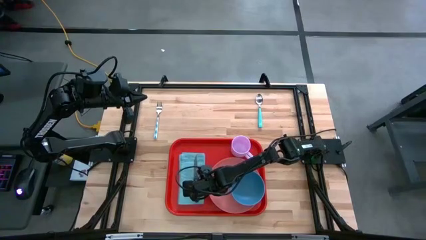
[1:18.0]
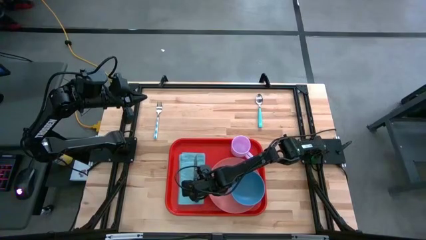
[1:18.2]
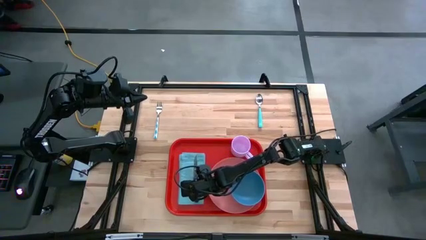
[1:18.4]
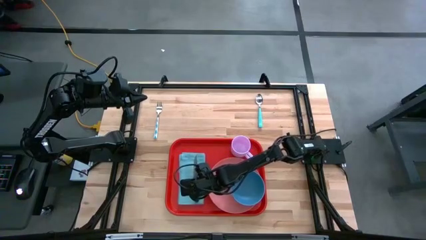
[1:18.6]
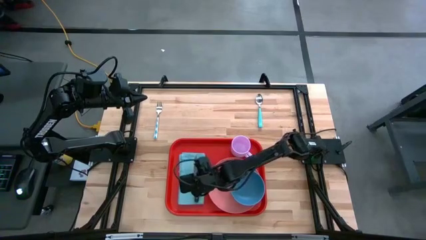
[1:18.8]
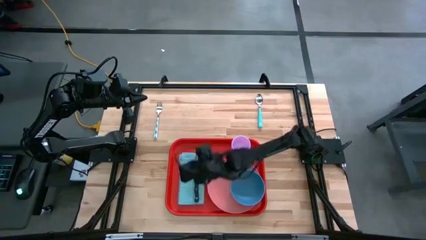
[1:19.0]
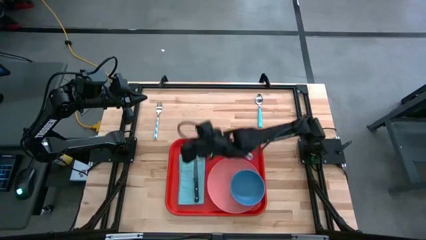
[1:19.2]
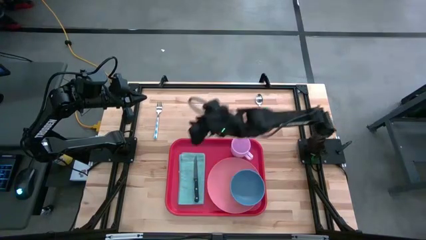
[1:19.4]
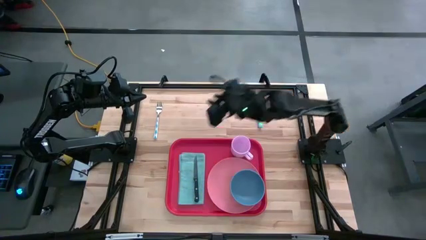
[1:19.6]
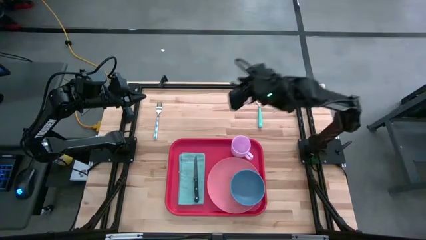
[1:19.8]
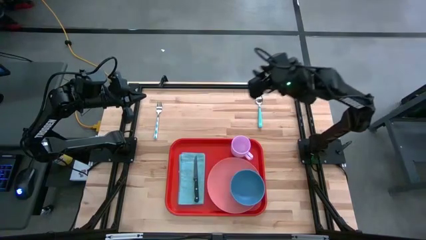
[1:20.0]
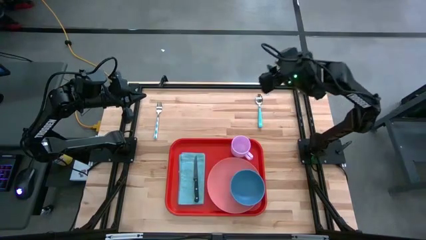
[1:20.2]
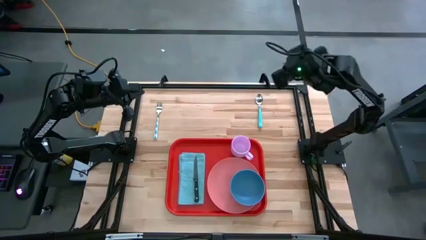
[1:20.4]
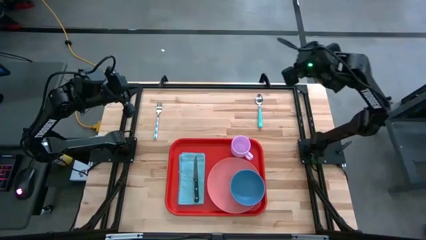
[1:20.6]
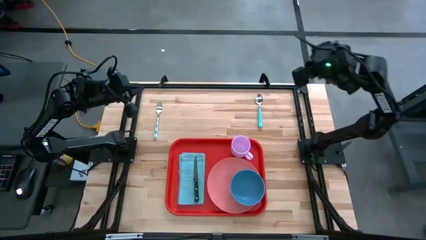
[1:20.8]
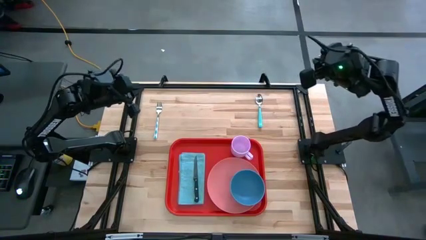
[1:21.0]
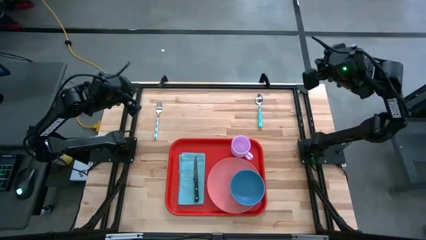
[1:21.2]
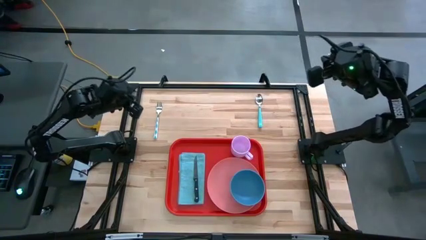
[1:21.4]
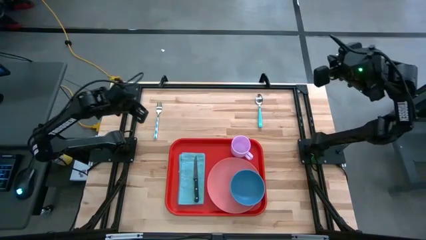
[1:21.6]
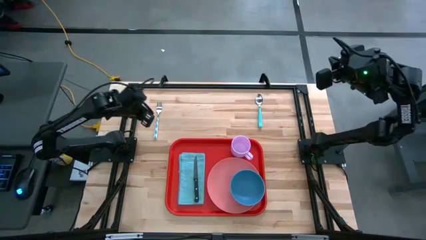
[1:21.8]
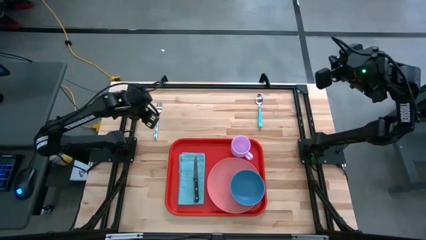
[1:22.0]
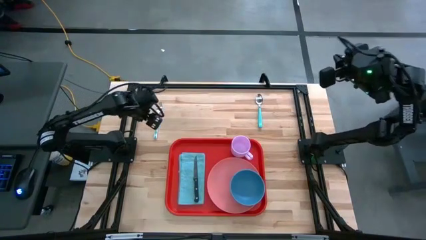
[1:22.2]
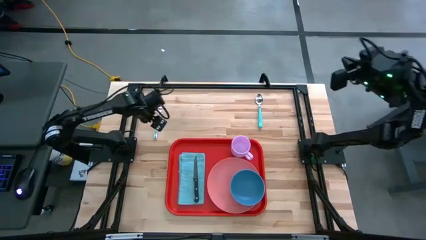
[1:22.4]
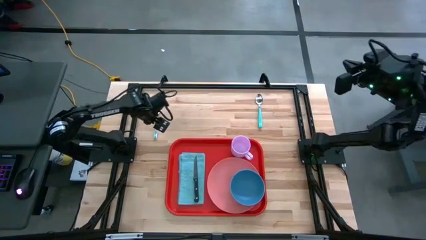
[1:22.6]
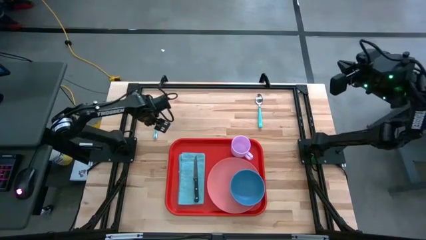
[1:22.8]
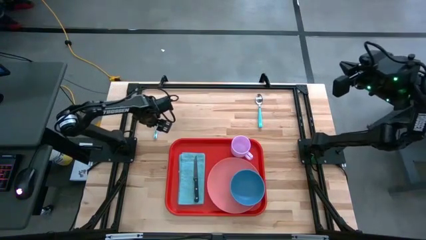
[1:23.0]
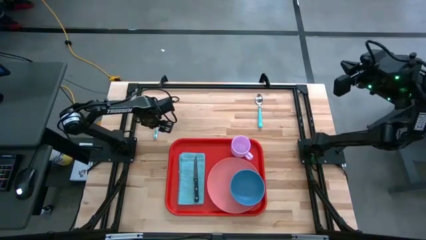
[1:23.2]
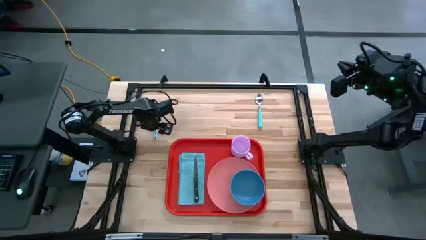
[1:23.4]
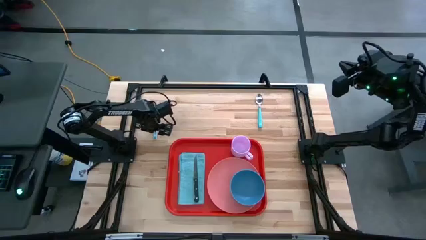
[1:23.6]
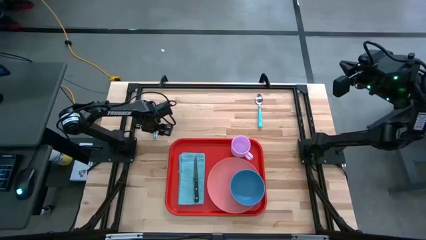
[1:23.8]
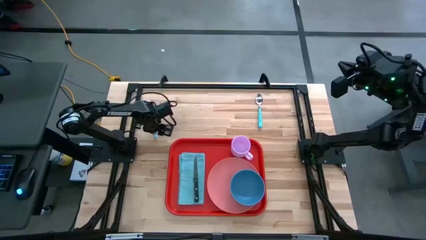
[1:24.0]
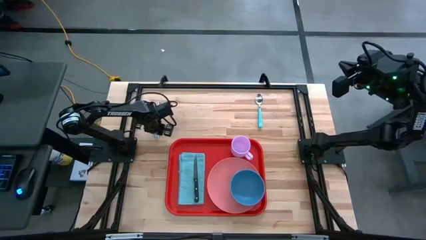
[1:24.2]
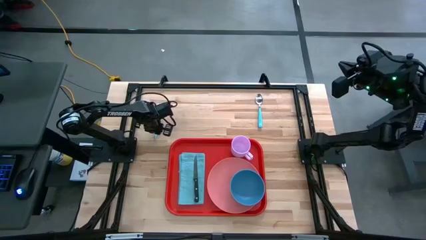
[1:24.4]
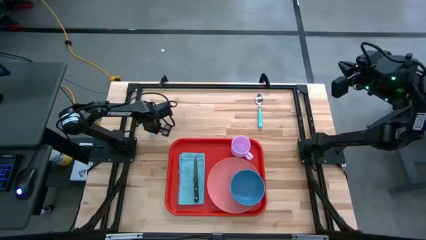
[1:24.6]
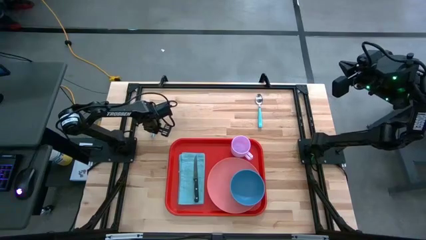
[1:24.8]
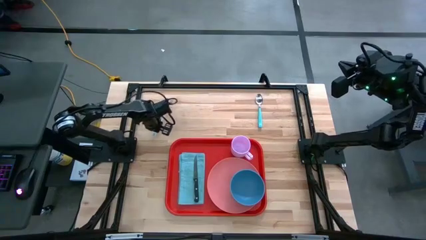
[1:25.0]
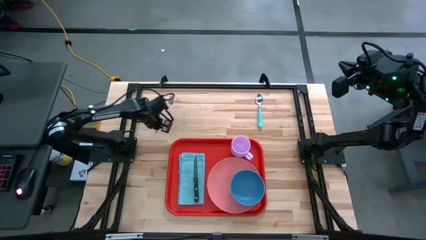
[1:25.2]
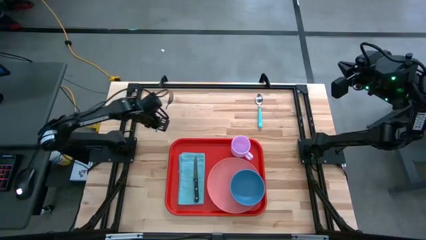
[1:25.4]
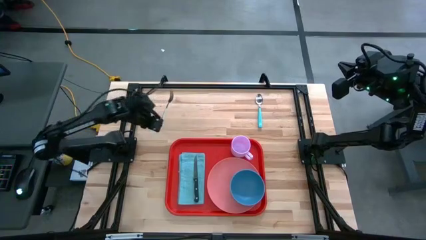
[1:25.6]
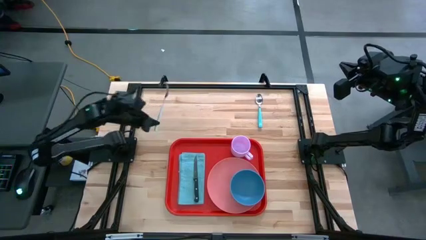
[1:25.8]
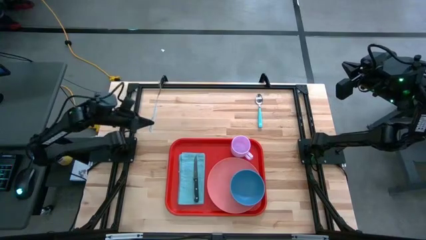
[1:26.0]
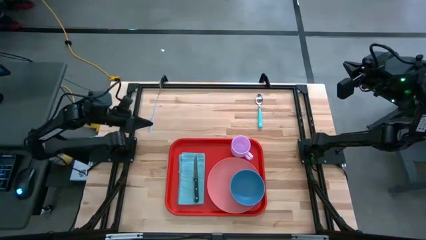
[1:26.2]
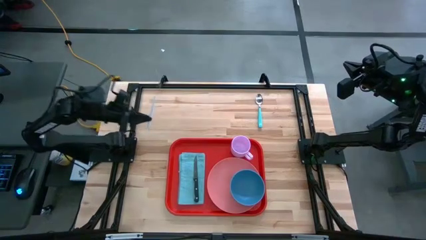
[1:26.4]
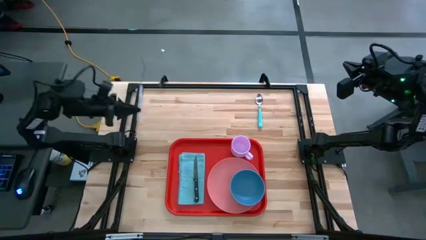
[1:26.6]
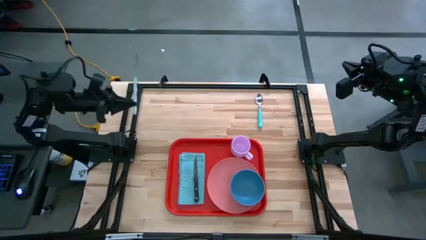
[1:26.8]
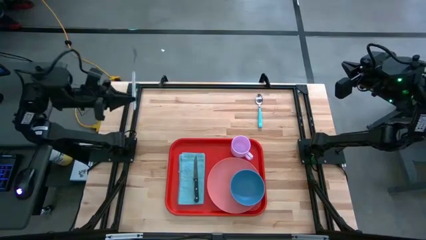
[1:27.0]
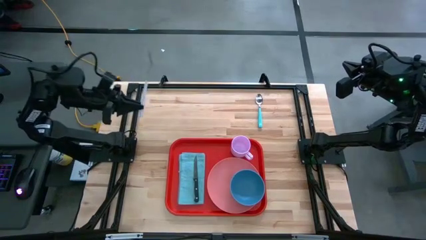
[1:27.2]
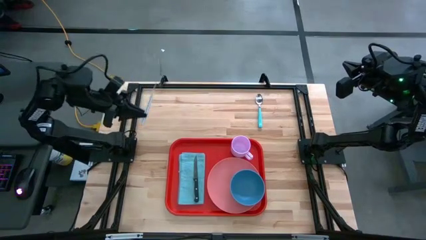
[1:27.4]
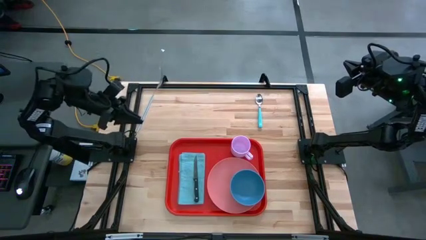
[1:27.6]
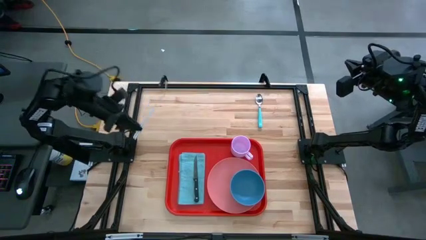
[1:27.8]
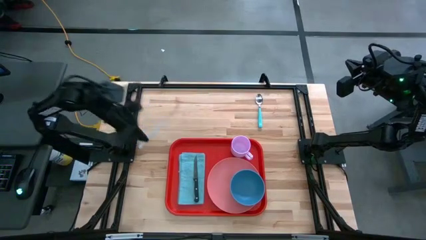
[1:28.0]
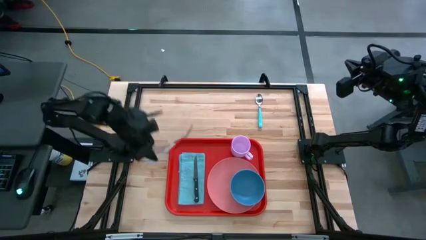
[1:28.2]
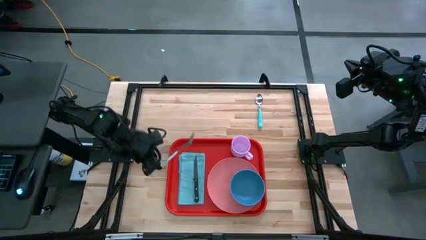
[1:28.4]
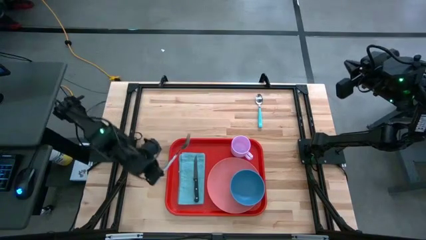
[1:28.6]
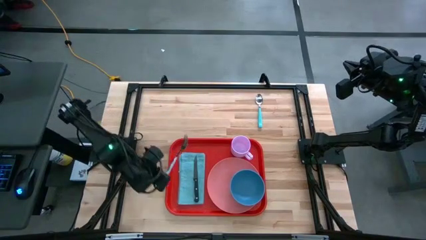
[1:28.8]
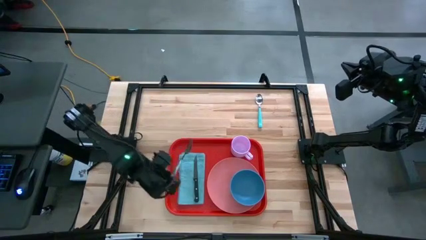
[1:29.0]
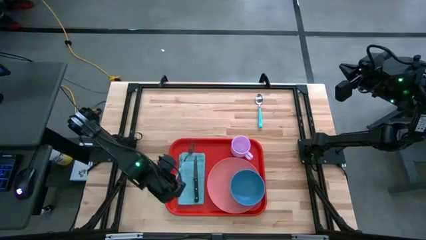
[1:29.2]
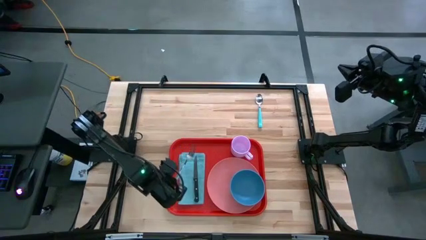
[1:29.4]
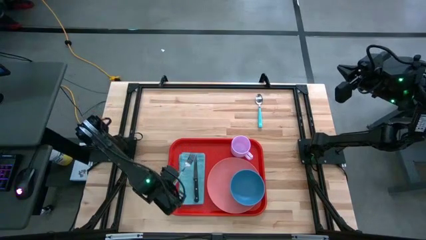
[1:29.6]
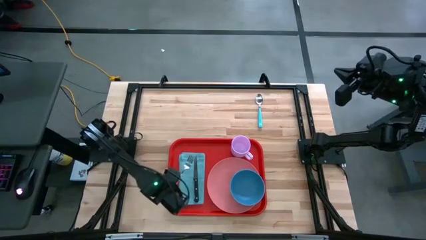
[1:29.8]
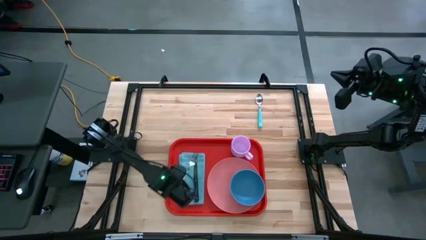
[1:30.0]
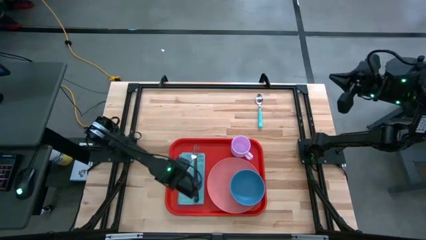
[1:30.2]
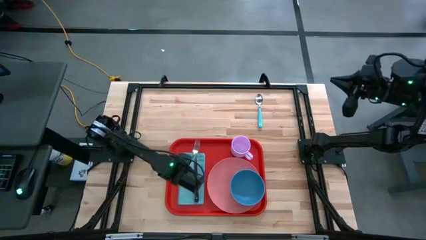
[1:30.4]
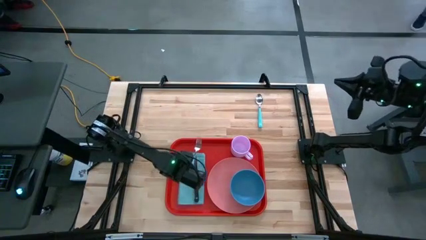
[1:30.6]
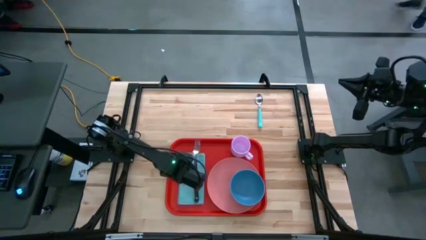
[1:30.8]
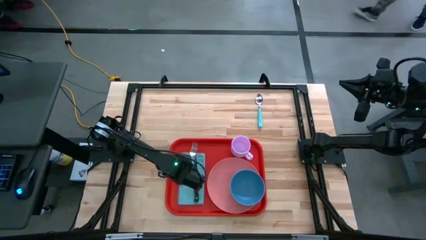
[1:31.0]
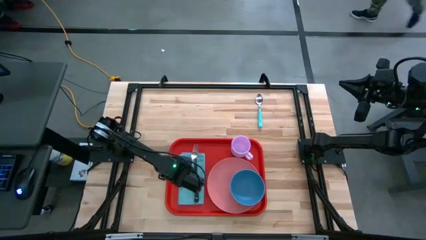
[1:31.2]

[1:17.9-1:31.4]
Task: Set up tray
Put the blue fork on the blue napkin to the left side of the black knife on the red serving tray
